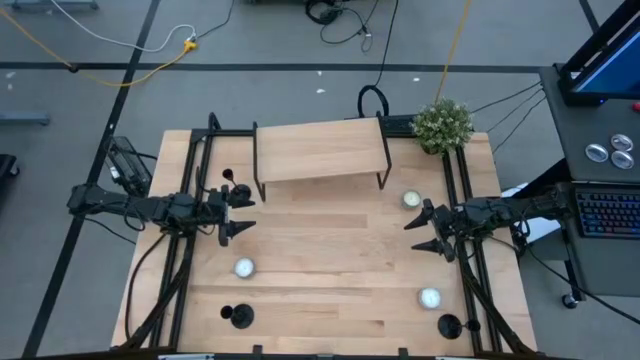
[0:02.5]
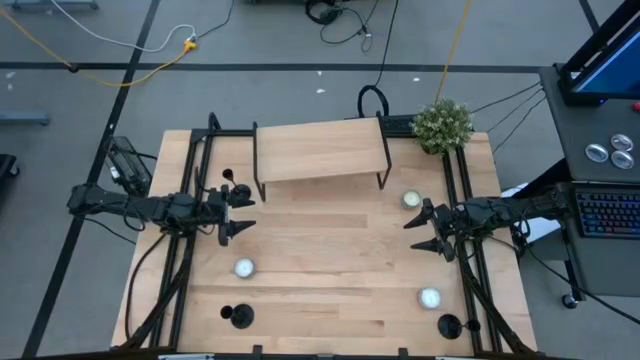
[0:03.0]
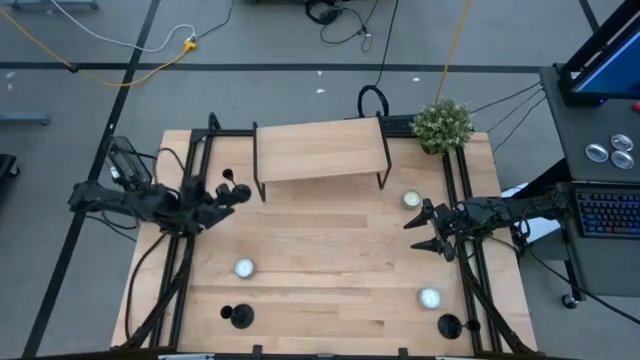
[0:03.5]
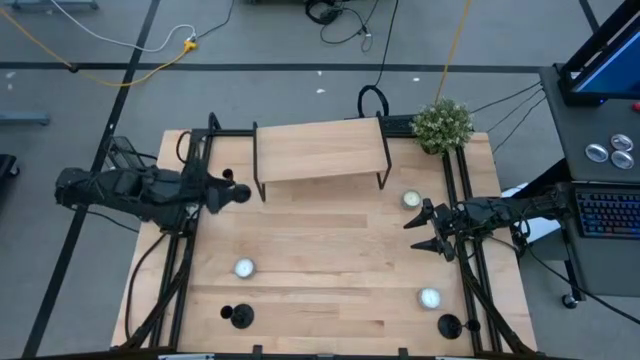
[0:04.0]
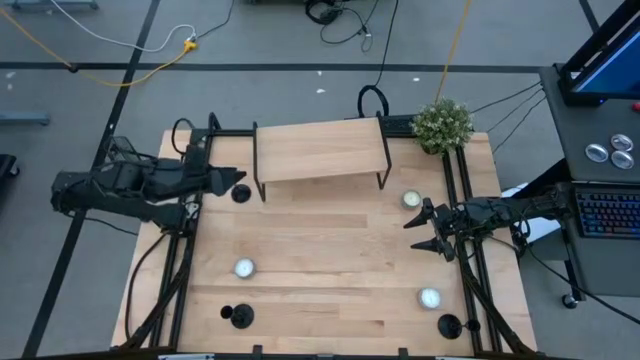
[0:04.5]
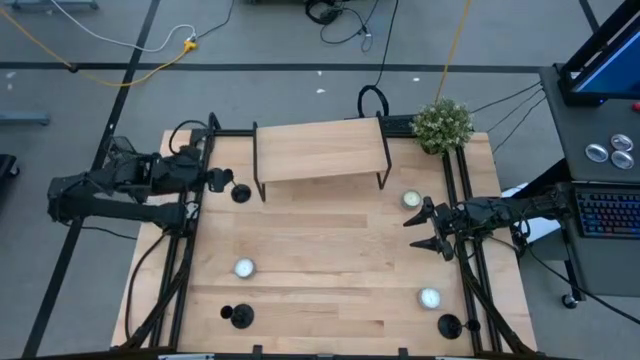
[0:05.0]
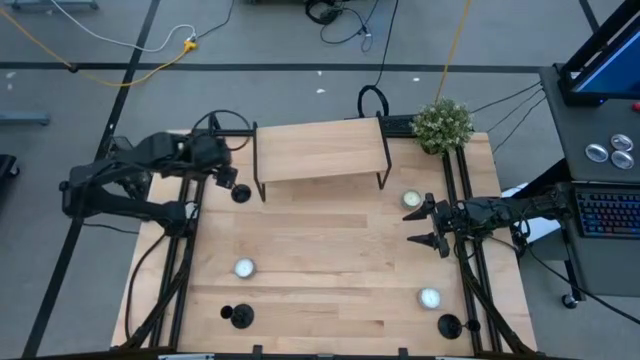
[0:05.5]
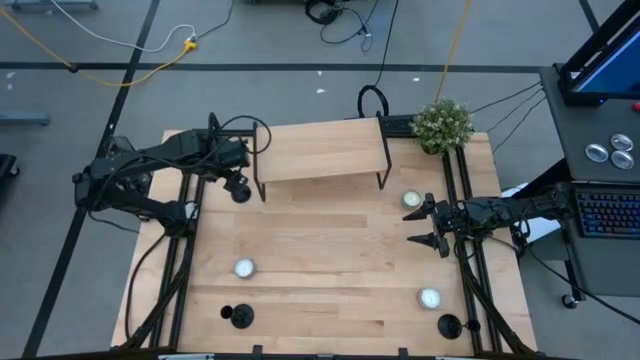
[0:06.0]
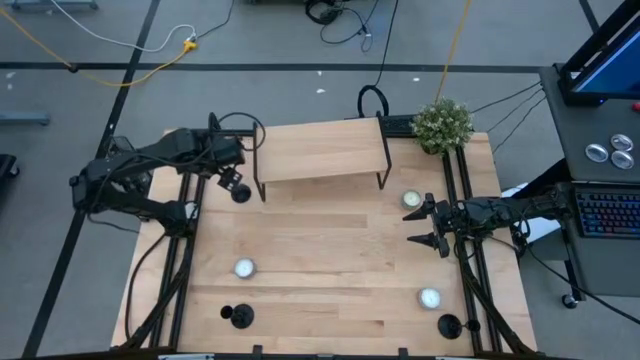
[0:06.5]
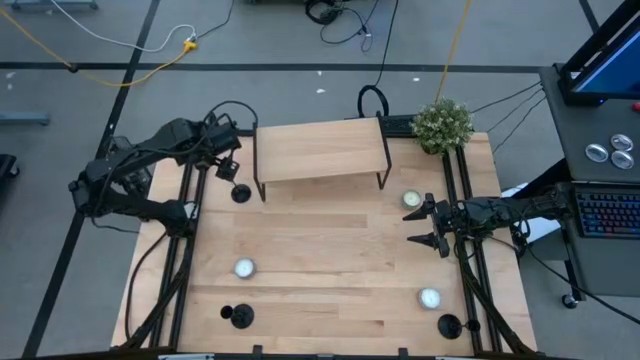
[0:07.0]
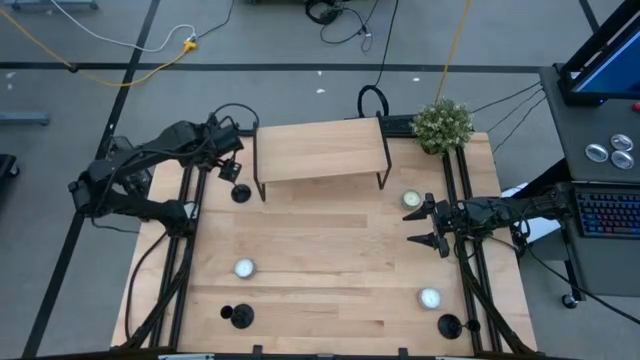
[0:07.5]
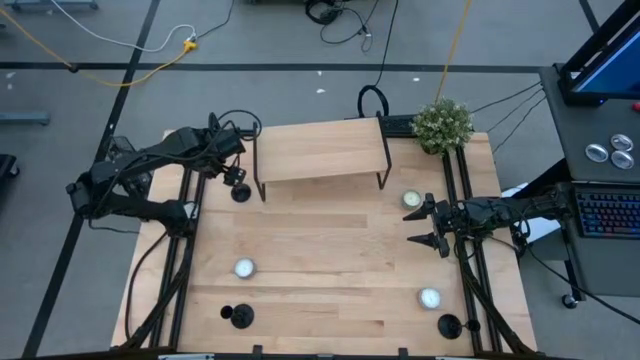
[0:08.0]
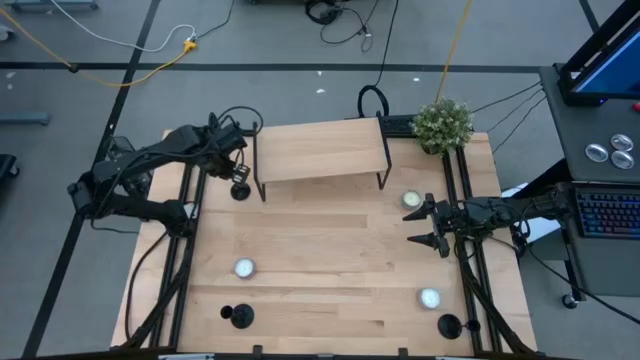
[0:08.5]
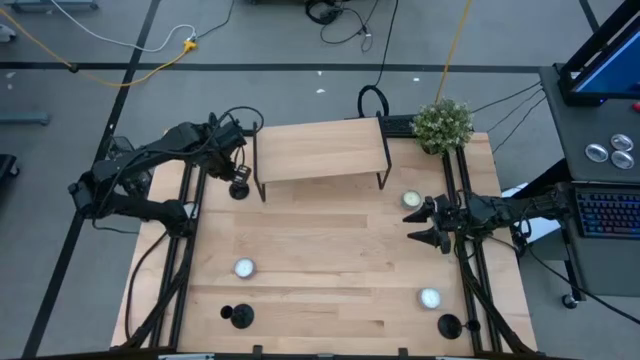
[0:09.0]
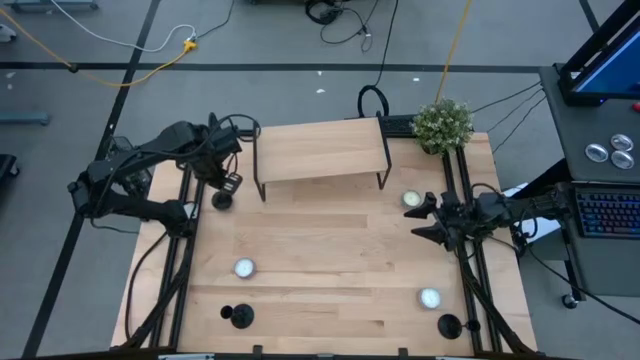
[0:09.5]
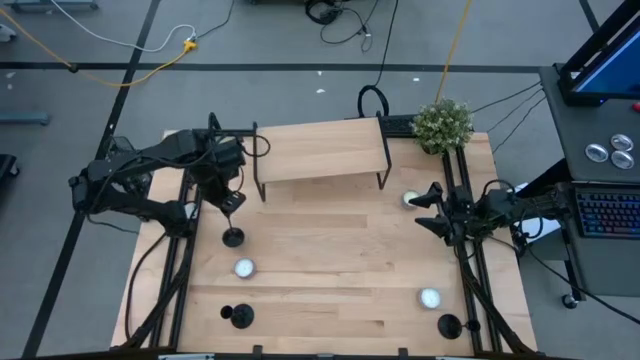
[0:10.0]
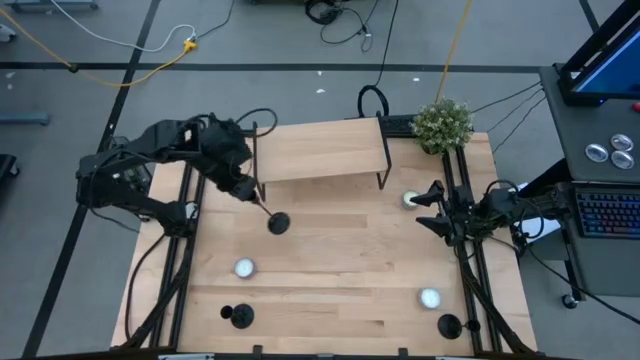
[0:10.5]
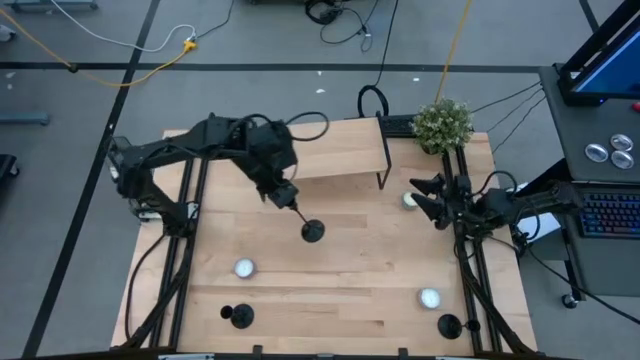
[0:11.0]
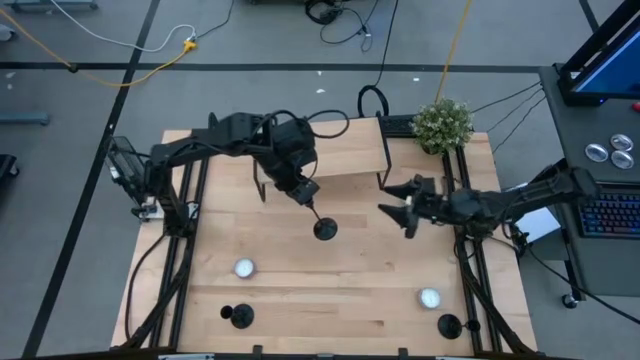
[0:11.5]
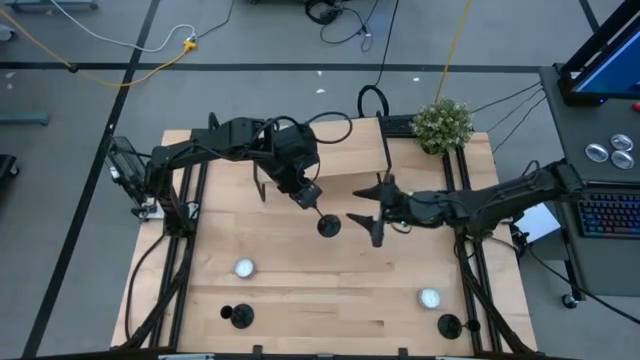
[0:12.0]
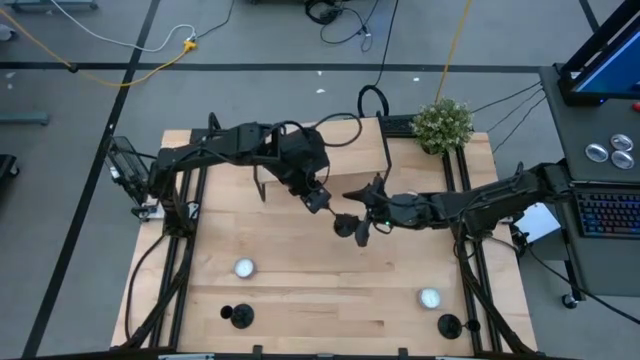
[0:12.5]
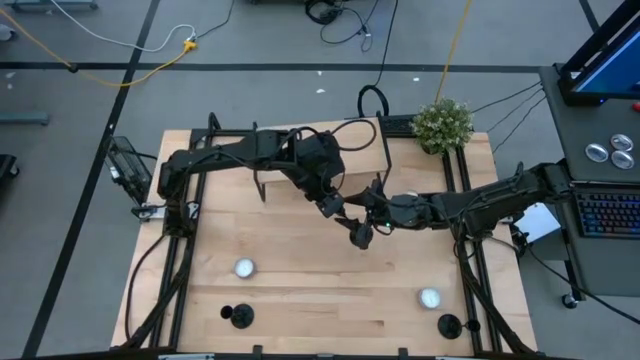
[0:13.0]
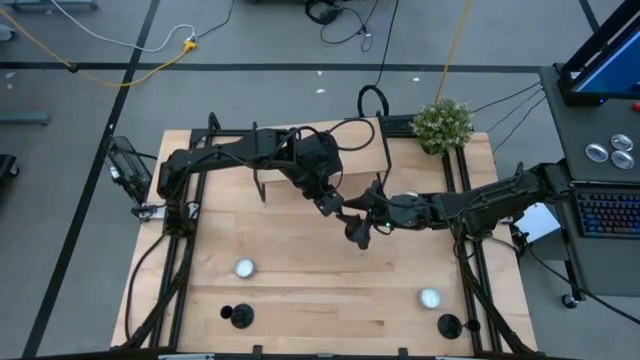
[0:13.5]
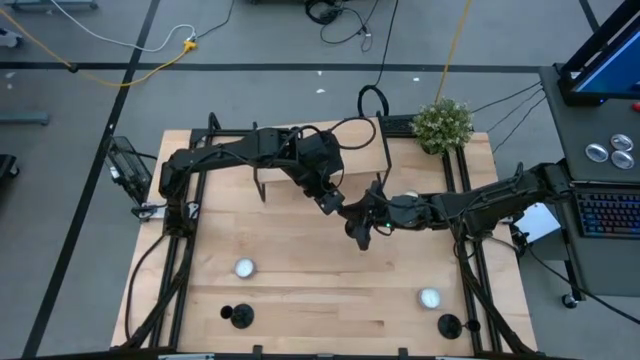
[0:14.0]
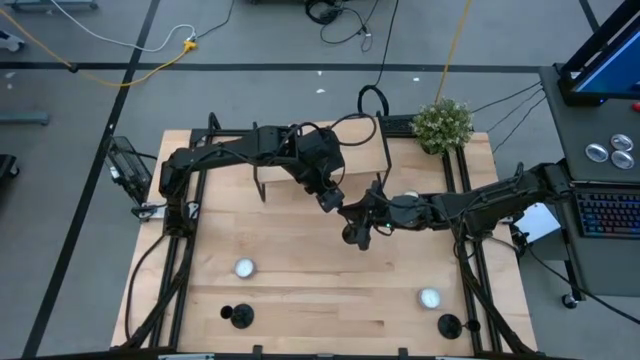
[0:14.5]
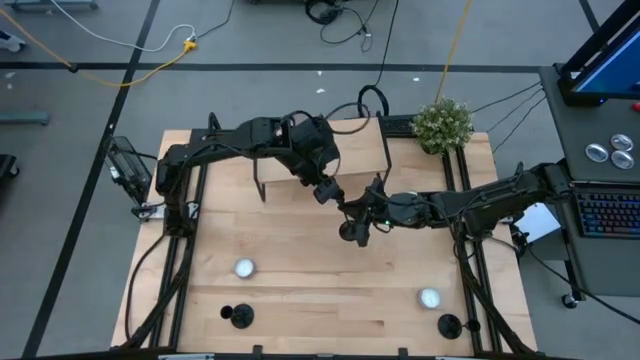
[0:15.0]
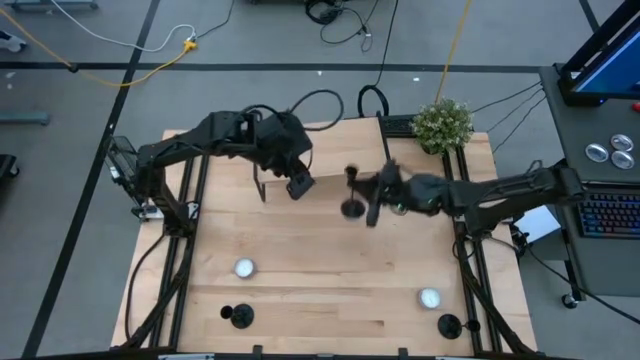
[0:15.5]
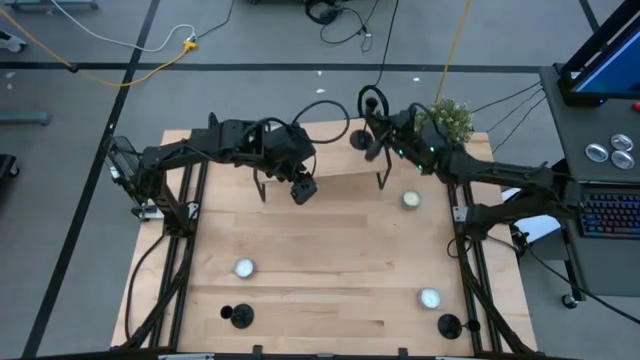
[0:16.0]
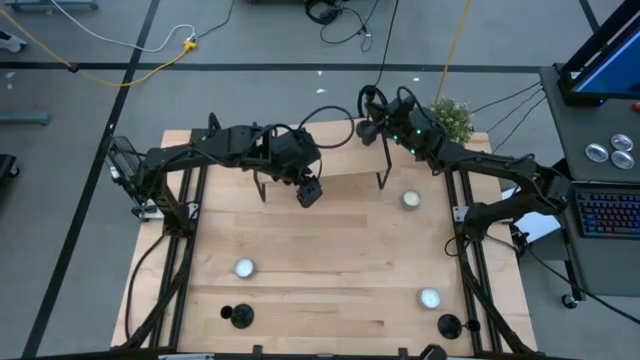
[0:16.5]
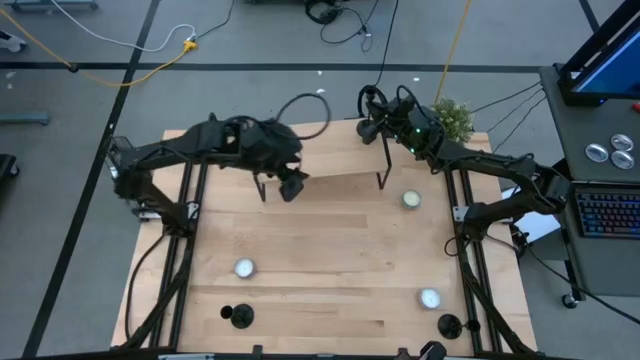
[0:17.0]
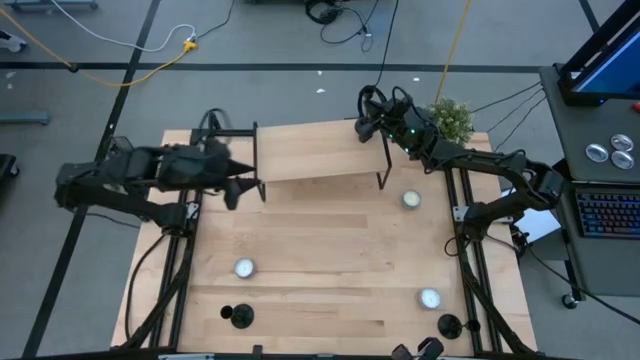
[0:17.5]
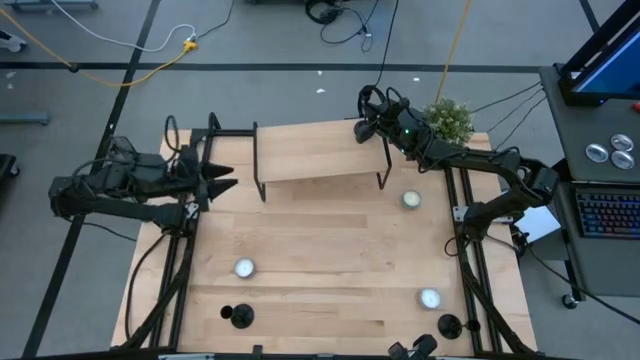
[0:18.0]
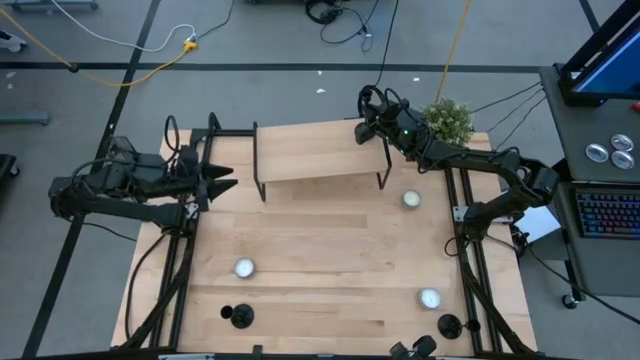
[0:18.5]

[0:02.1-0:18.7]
Task: Pick & Place candle stick holders
Put the top black candle holder on the shelf

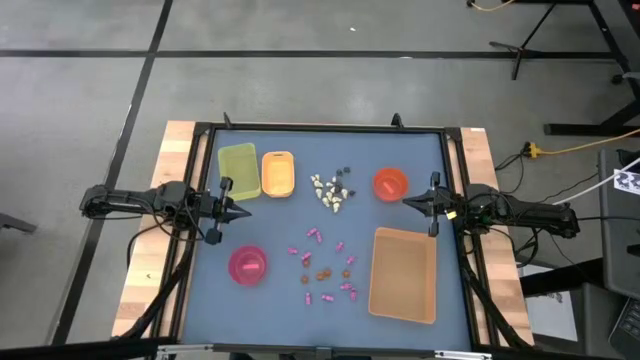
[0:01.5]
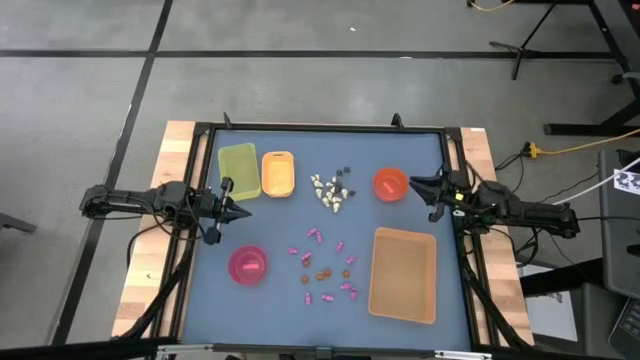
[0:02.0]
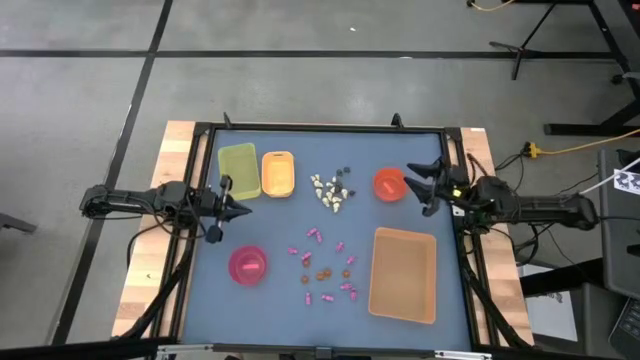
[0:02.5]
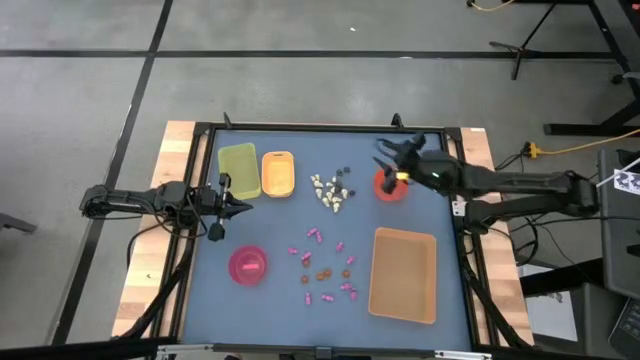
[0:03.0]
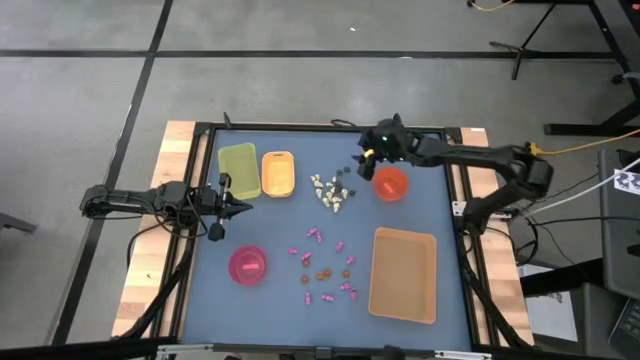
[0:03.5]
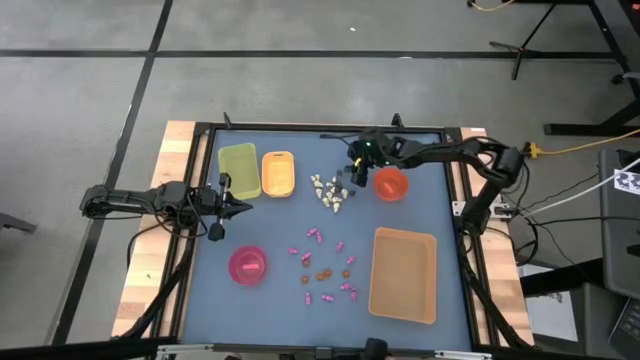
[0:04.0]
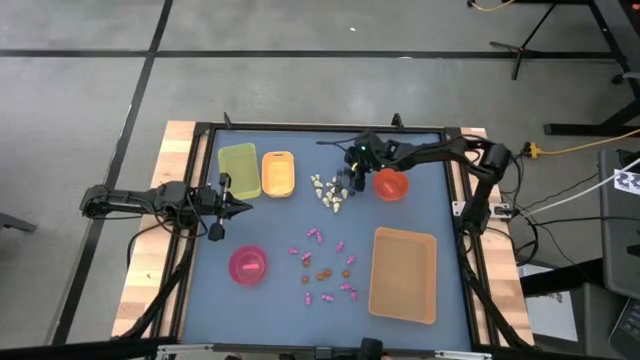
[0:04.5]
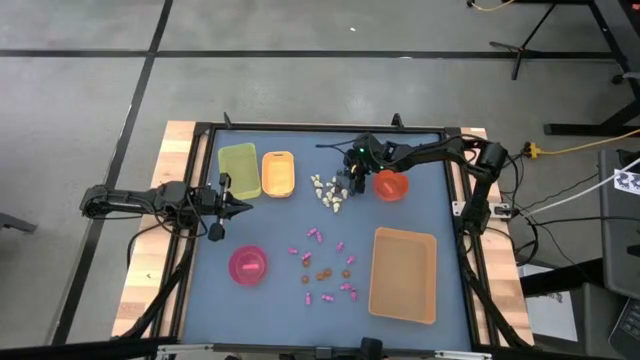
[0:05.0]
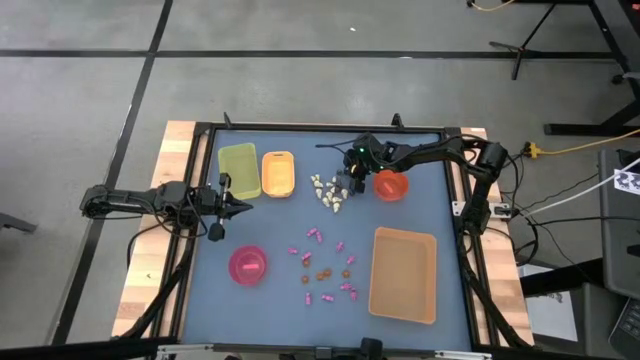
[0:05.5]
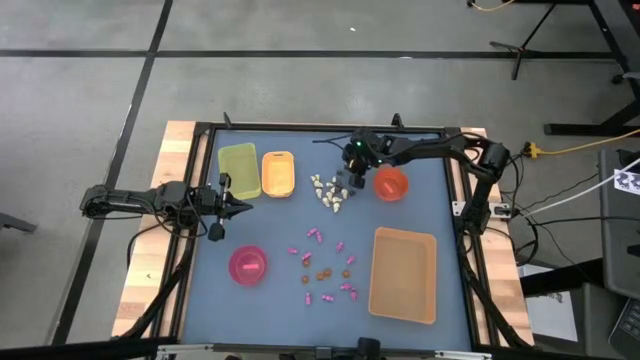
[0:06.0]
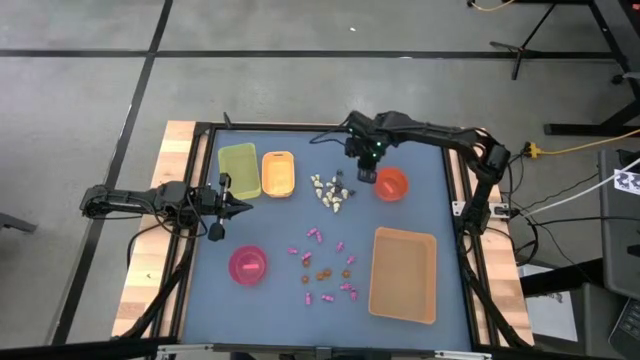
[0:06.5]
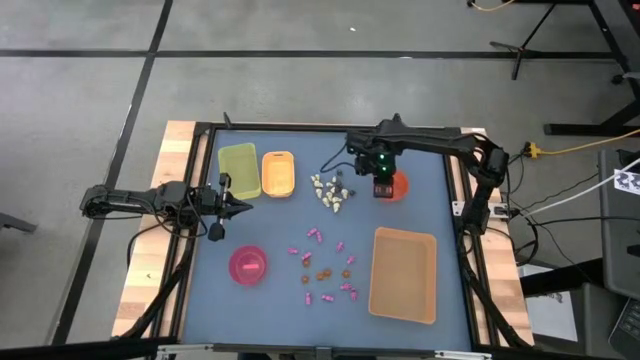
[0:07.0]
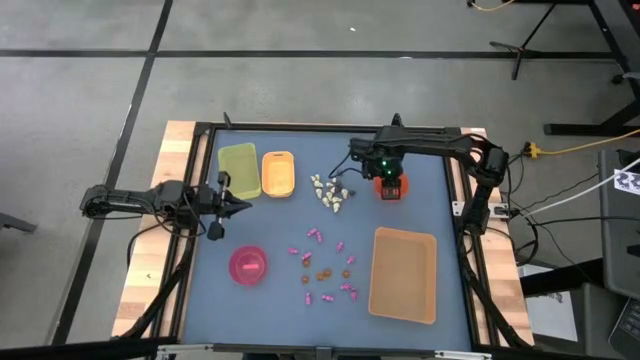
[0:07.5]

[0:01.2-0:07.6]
Task: Sort Halloween decoration
Put the black skull toy into the orange bowl
